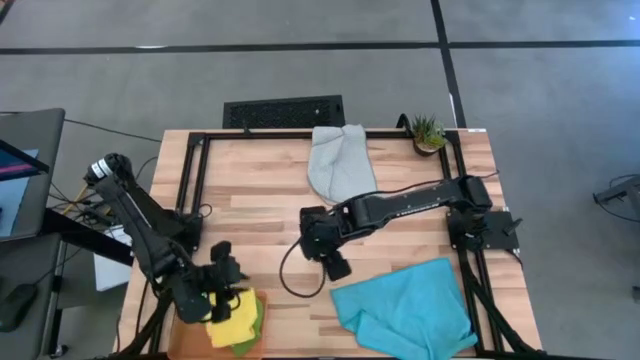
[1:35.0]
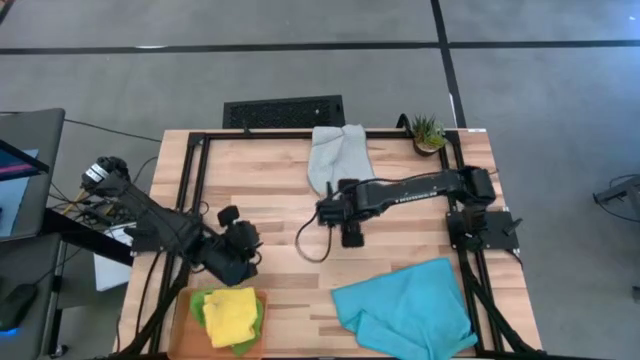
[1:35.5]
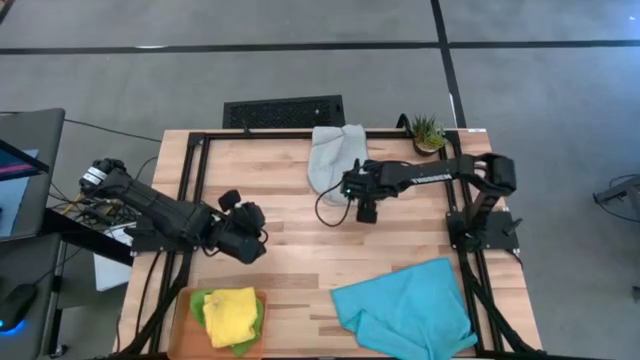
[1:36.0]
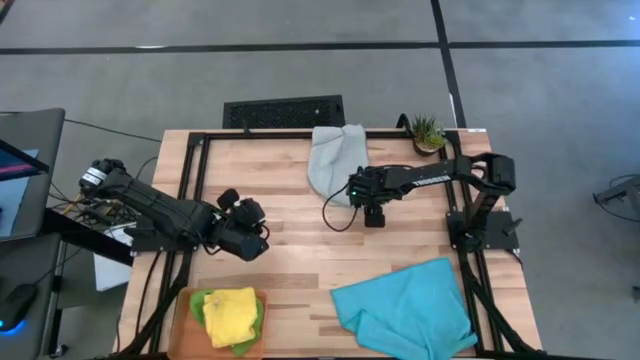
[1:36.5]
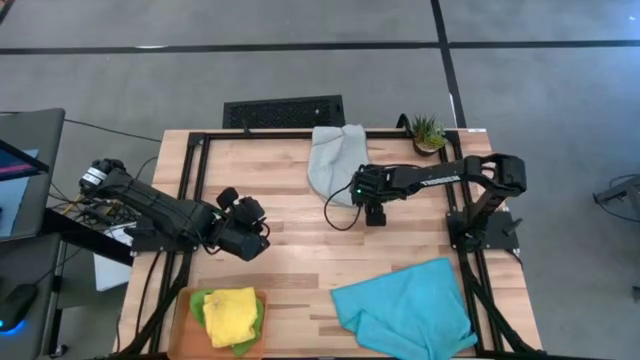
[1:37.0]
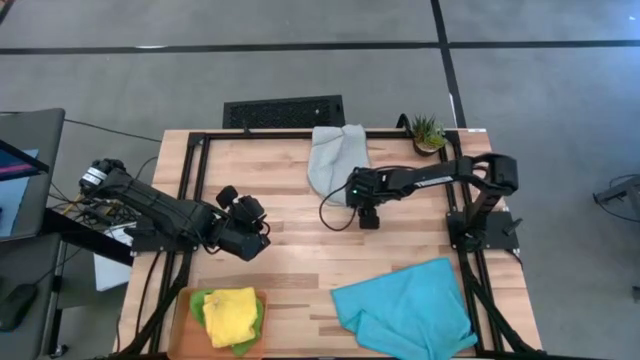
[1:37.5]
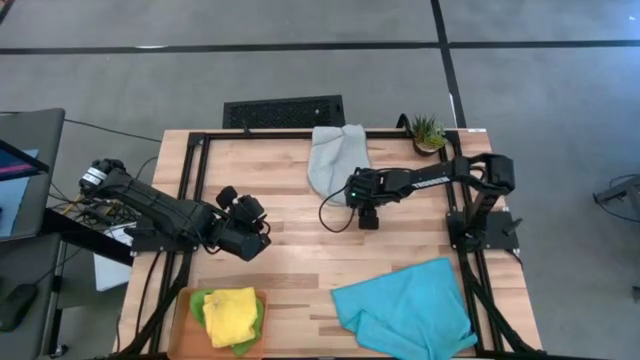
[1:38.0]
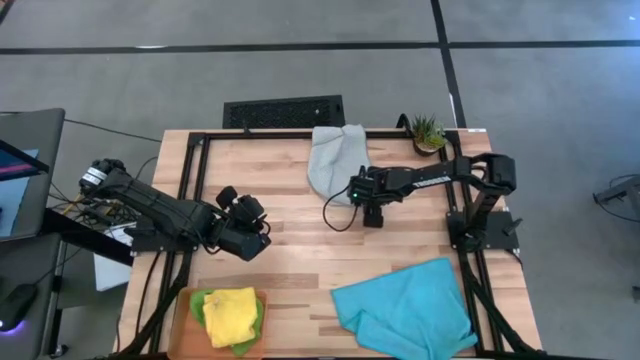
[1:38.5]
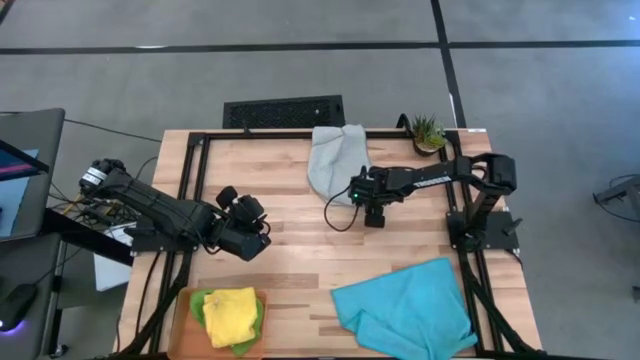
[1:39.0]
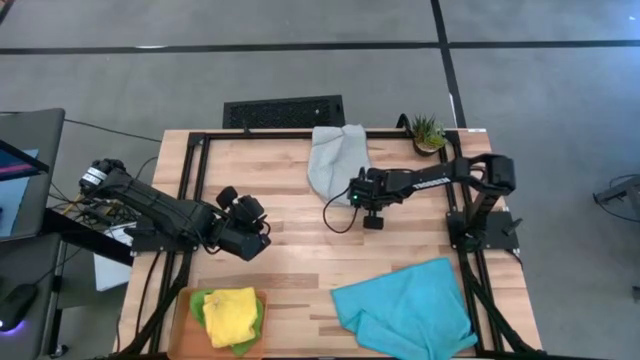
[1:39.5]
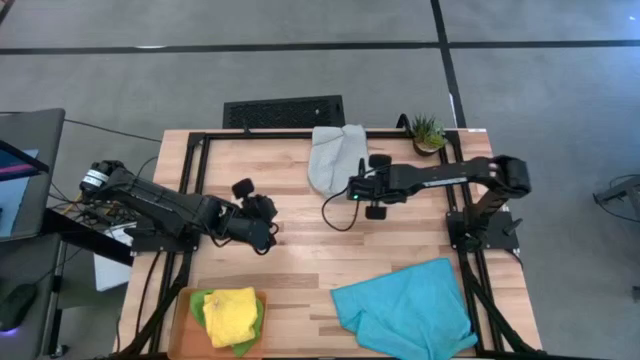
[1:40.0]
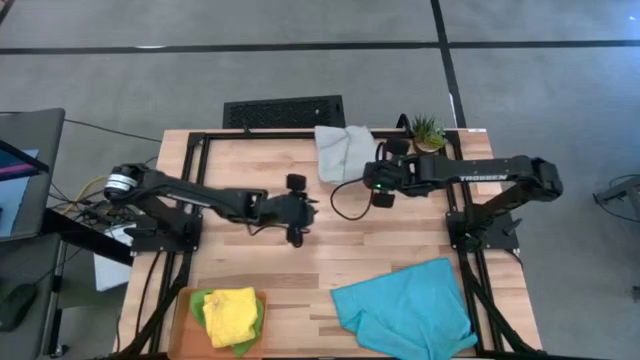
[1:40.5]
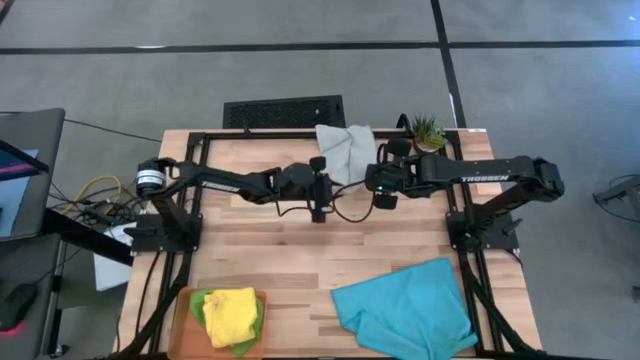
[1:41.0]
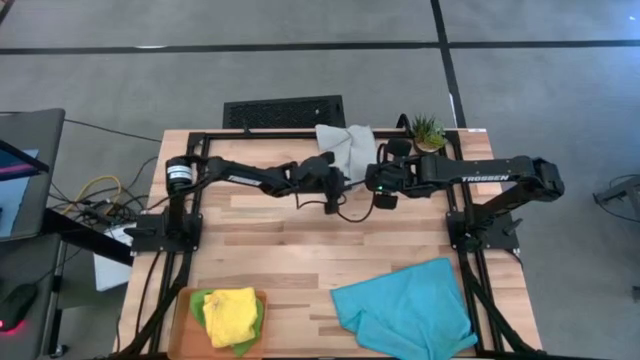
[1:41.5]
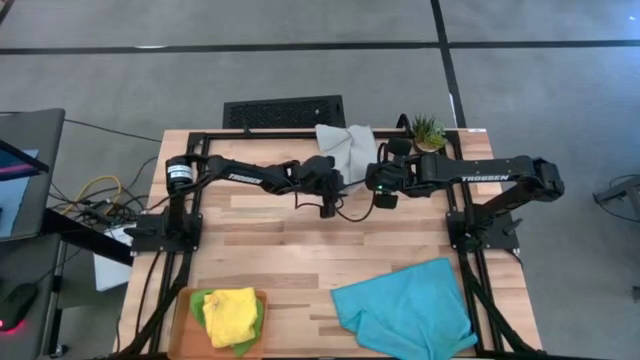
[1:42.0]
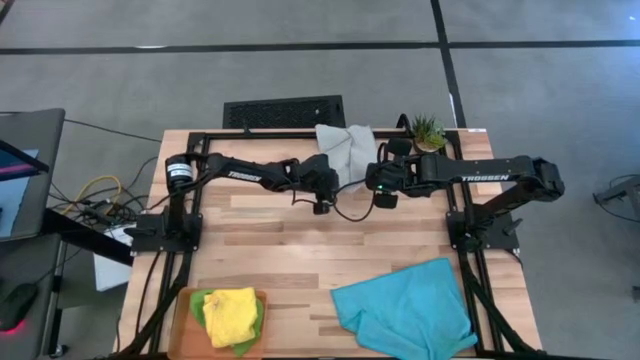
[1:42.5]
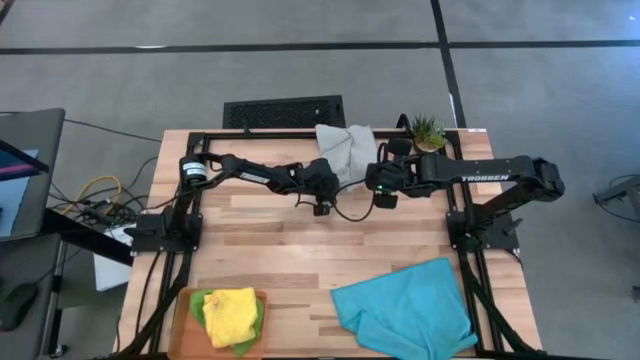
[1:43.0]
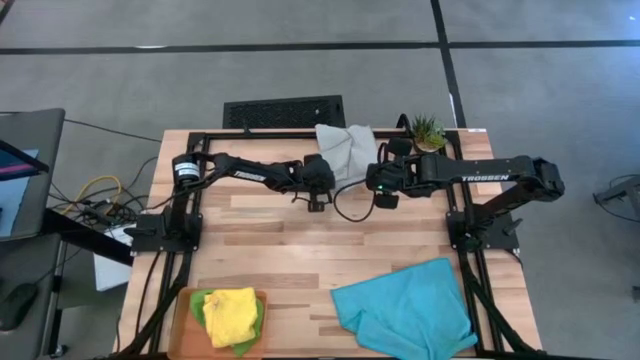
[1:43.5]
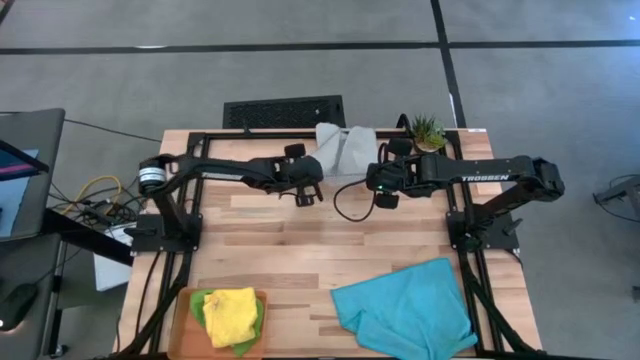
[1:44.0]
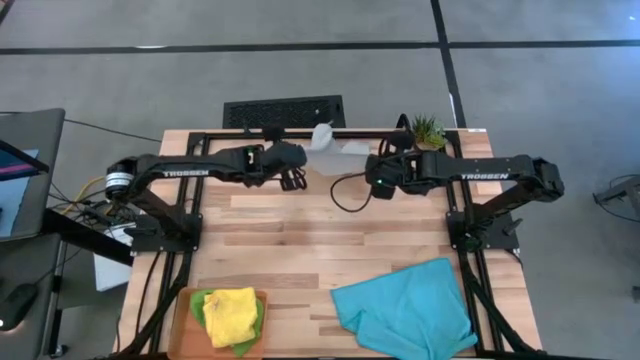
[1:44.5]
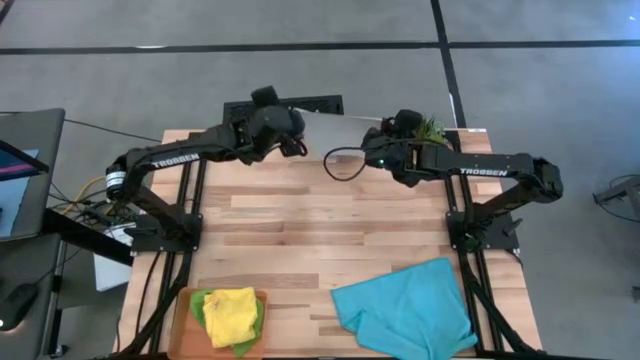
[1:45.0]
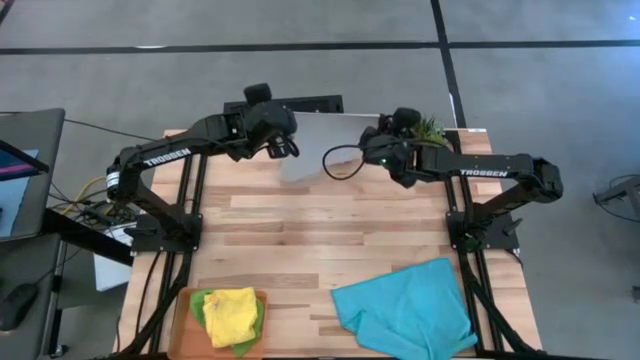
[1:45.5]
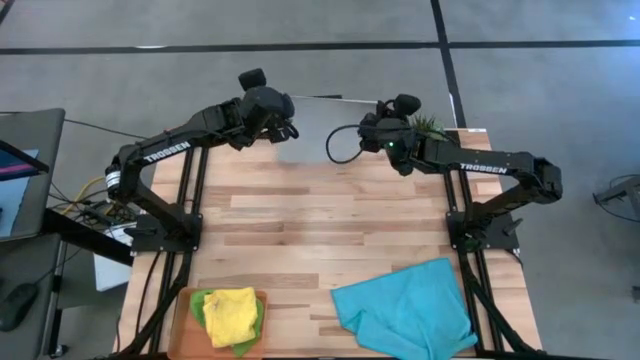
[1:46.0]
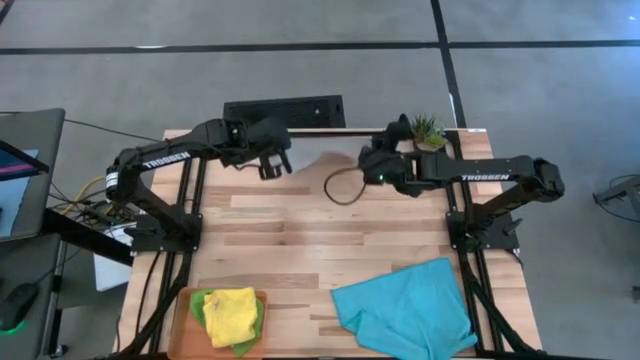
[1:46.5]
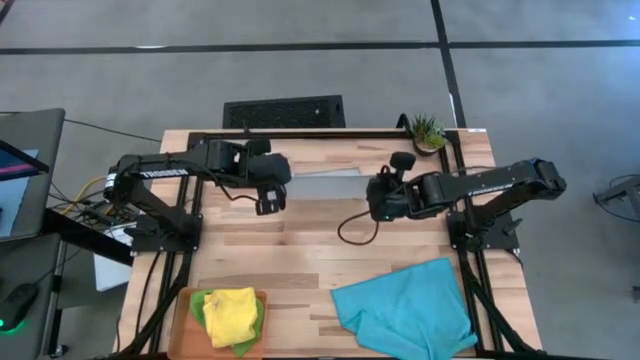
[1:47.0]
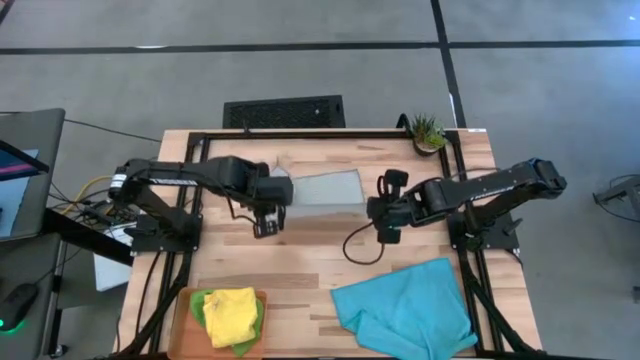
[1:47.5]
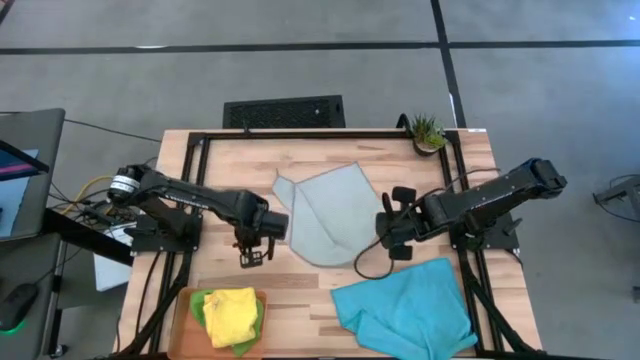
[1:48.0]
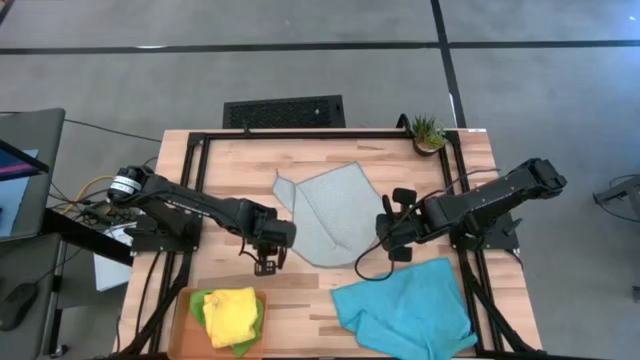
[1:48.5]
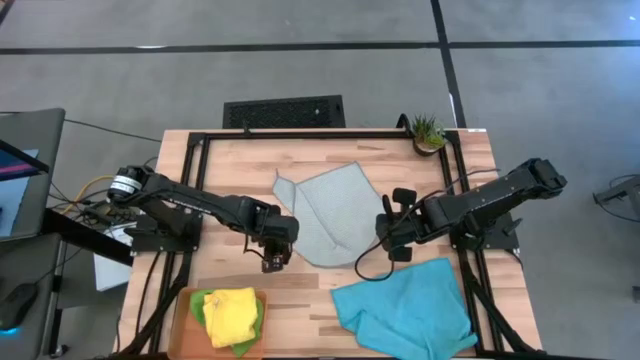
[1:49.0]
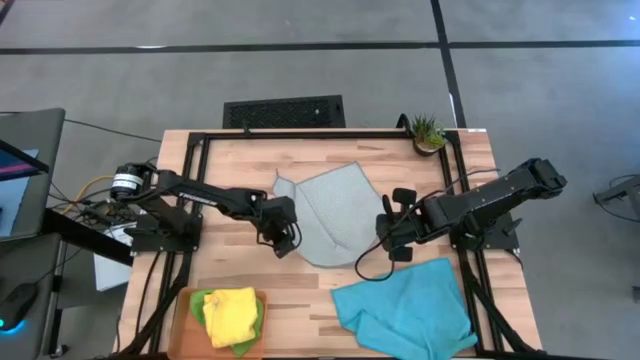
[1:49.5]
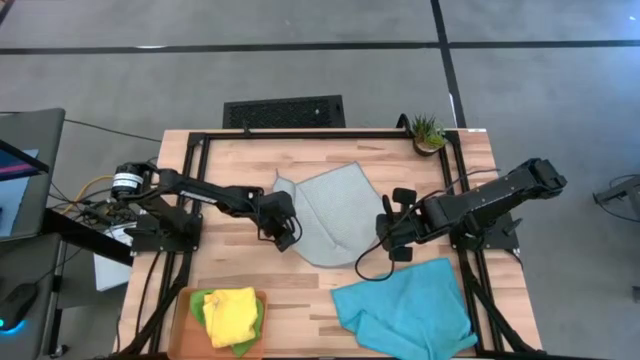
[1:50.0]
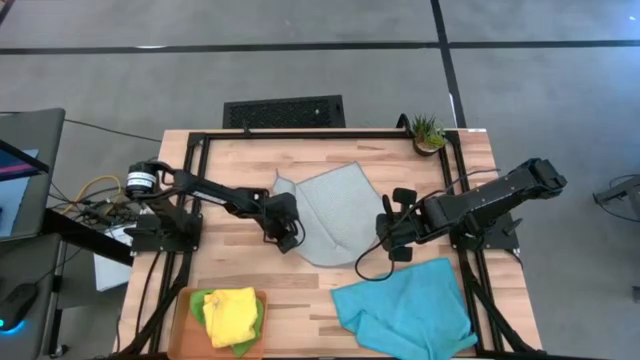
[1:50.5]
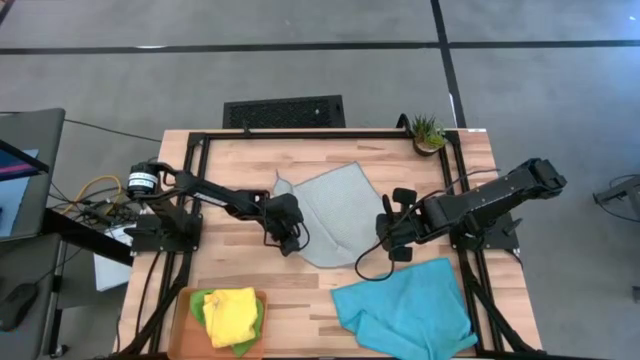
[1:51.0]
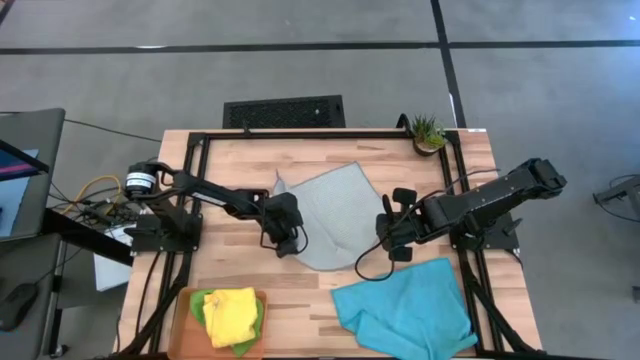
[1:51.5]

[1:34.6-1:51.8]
Task: Fold microfiber towels
Fold the gray towel

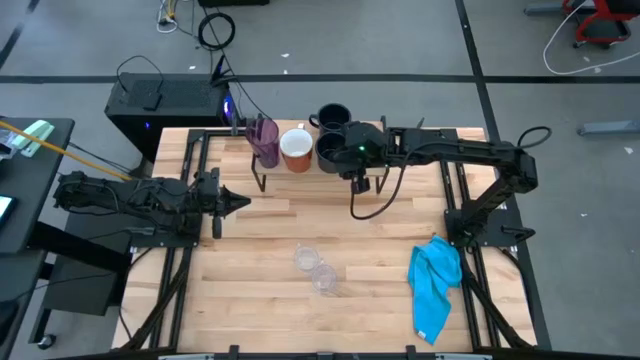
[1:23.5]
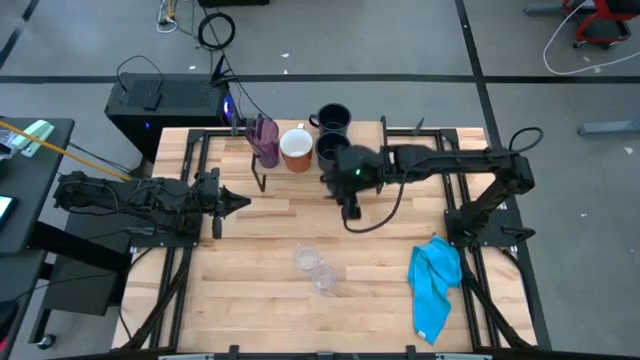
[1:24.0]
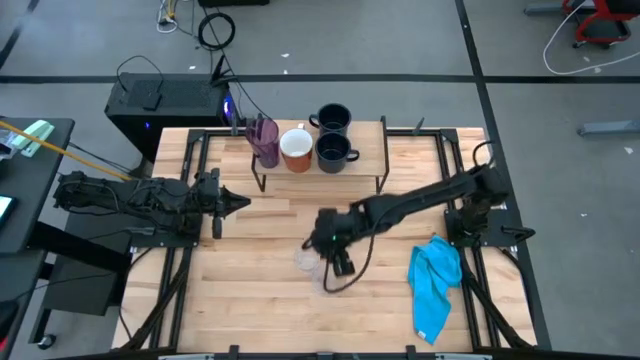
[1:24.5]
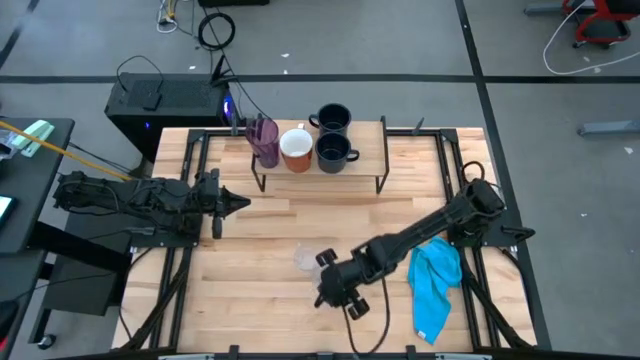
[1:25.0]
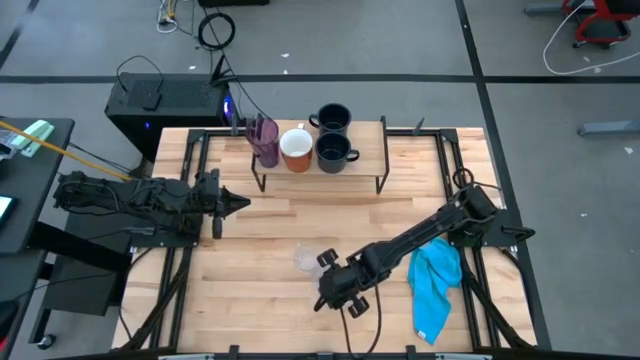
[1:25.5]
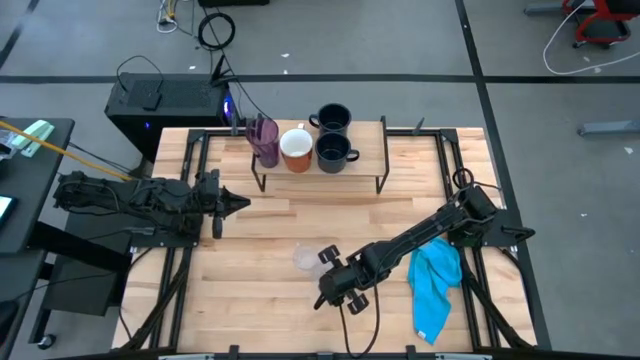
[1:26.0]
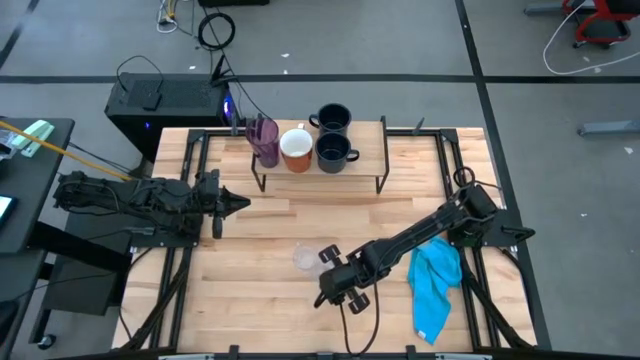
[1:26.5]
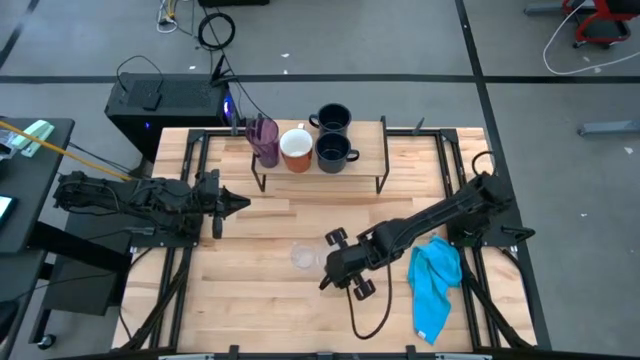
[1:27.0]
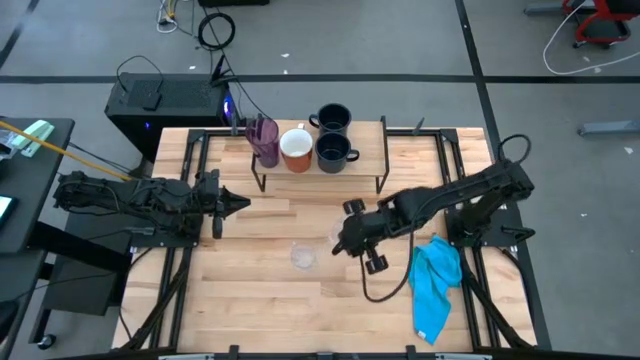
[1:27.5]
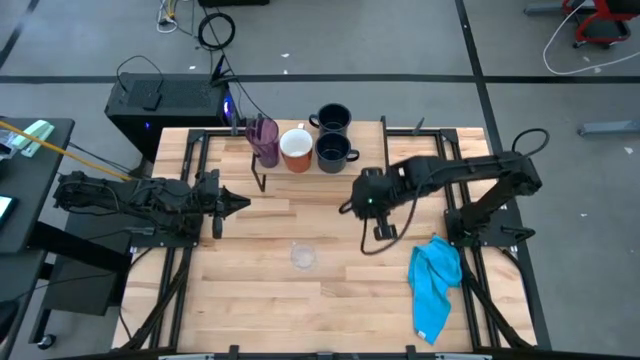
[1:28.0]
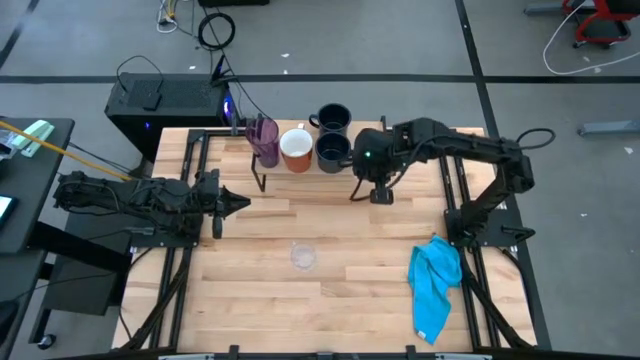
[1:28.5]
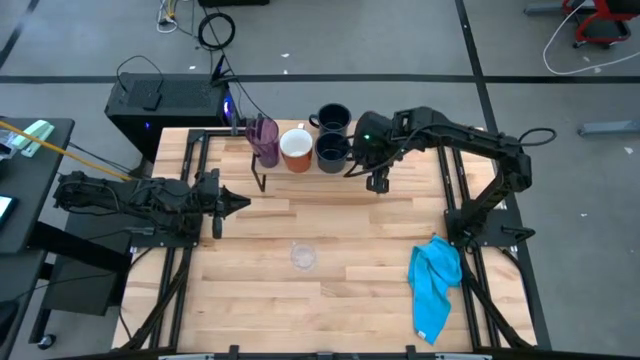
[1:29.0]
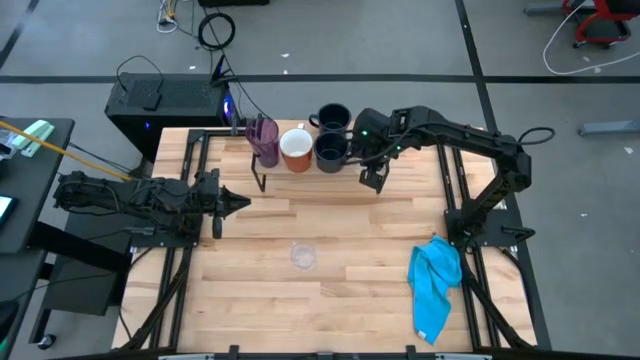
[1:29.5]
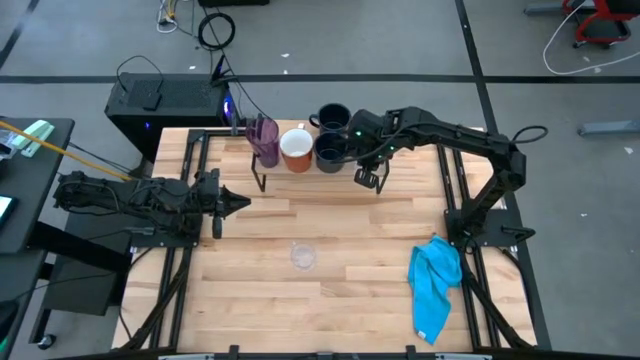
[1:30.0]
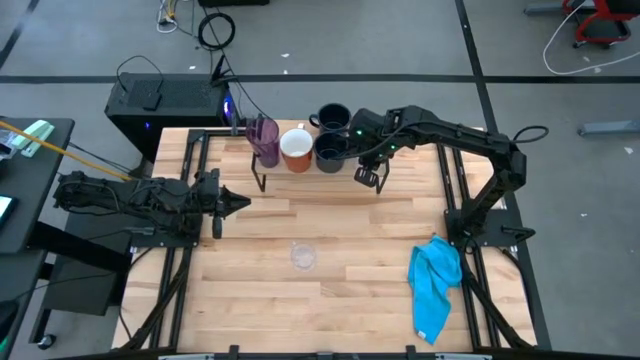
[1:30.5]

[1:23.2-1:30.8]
Task: Stack small to large cups/mugs on shelf
Put the right transparent mug on the shelf
